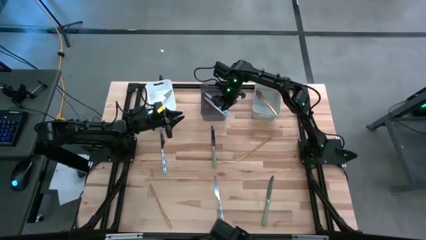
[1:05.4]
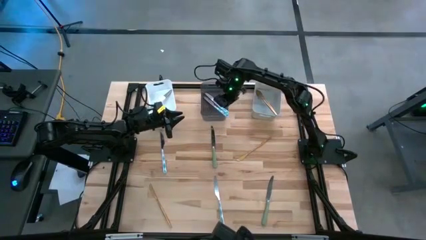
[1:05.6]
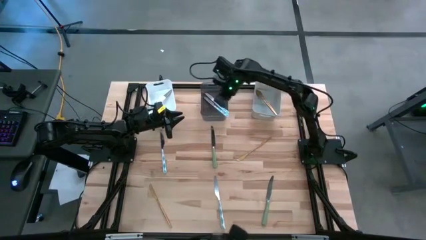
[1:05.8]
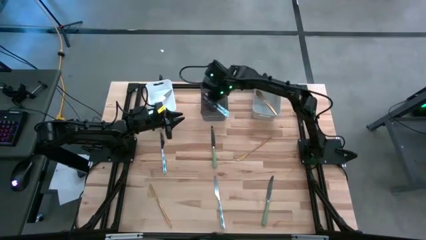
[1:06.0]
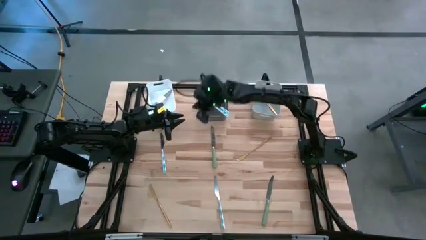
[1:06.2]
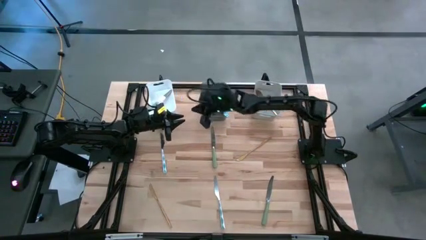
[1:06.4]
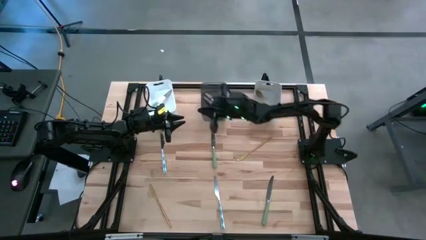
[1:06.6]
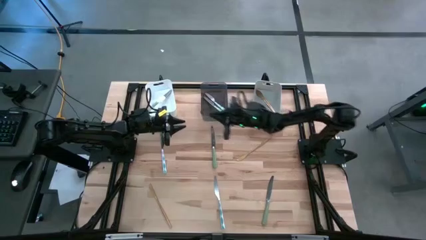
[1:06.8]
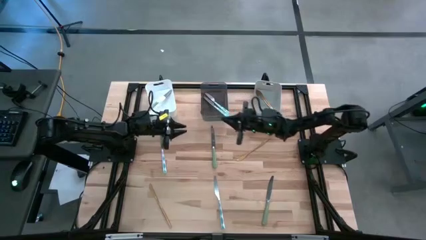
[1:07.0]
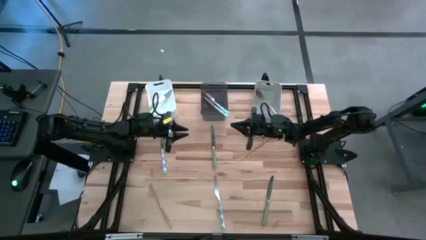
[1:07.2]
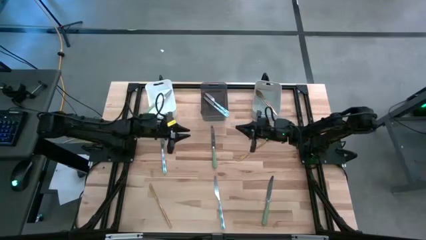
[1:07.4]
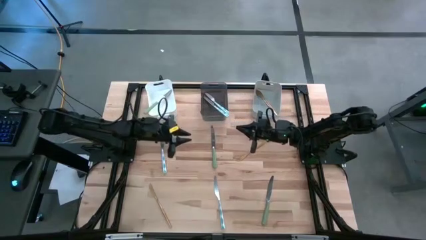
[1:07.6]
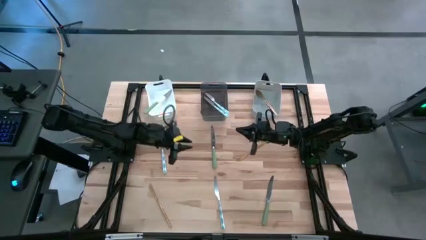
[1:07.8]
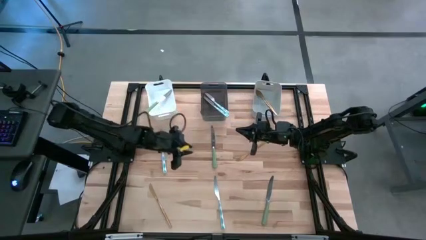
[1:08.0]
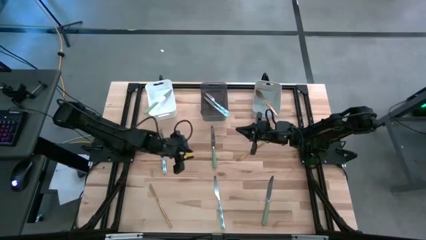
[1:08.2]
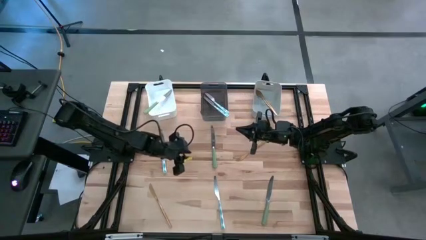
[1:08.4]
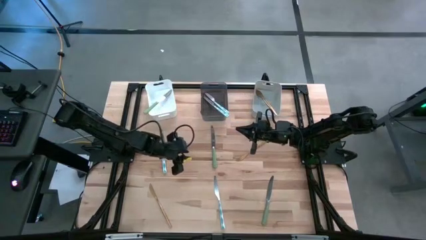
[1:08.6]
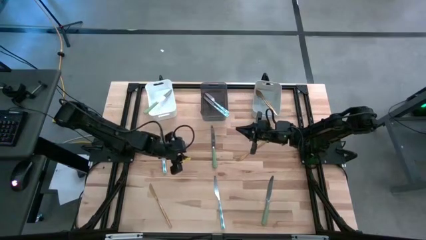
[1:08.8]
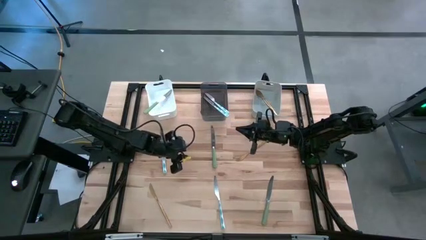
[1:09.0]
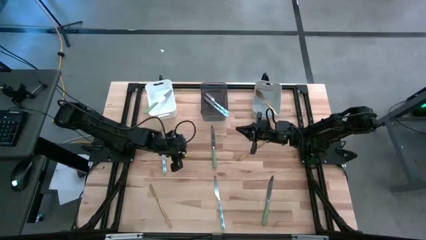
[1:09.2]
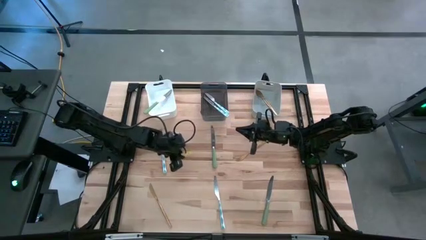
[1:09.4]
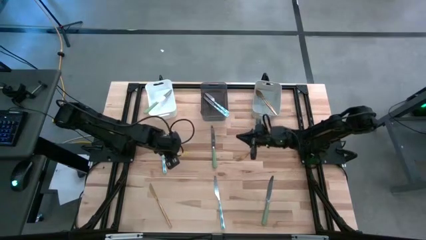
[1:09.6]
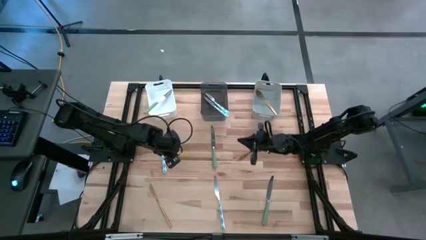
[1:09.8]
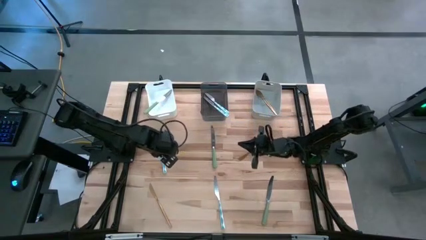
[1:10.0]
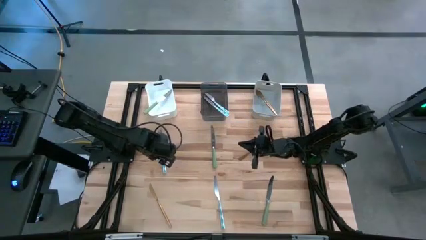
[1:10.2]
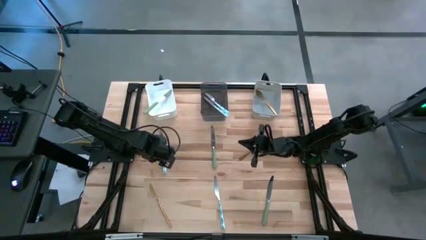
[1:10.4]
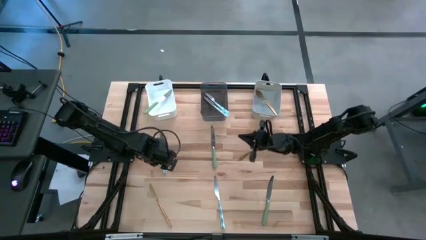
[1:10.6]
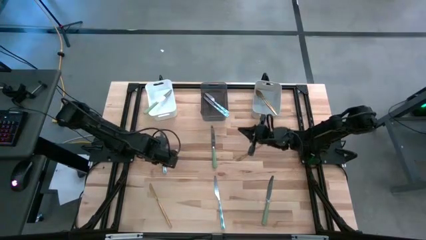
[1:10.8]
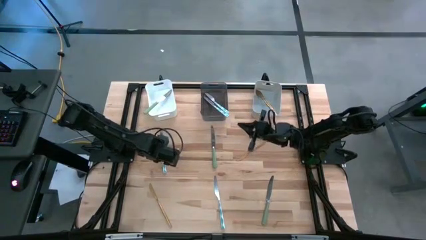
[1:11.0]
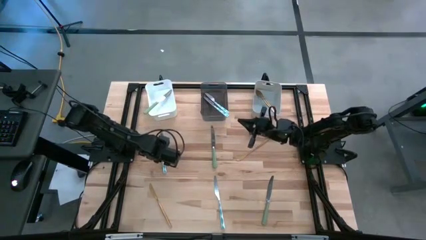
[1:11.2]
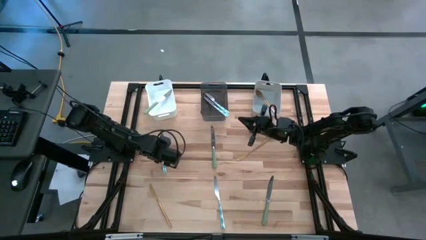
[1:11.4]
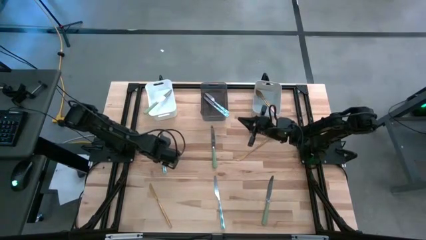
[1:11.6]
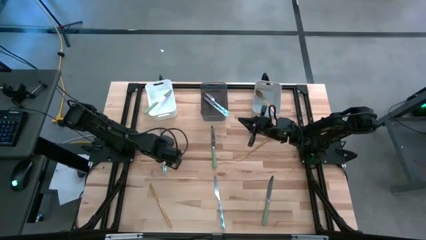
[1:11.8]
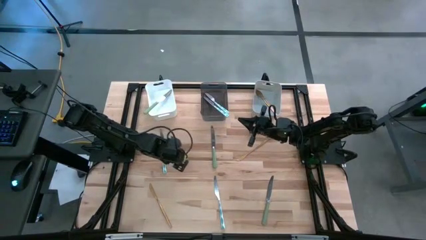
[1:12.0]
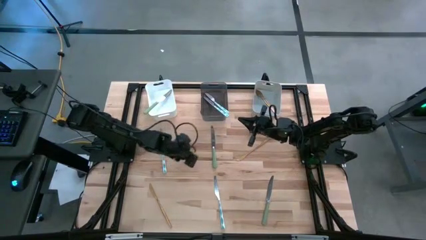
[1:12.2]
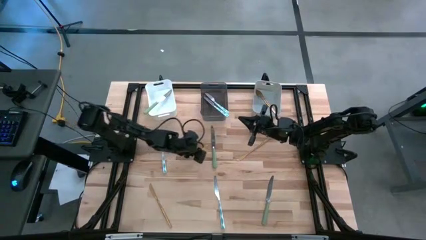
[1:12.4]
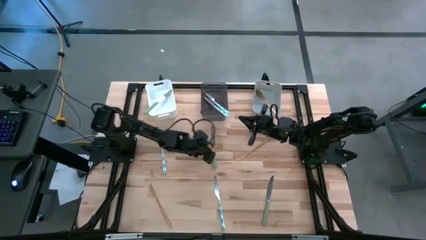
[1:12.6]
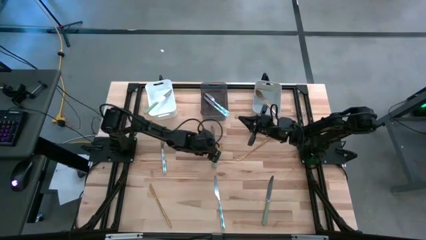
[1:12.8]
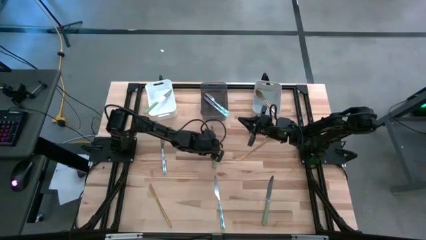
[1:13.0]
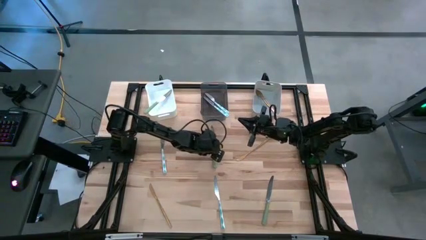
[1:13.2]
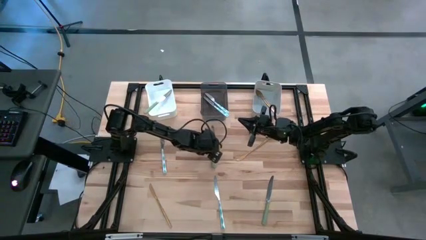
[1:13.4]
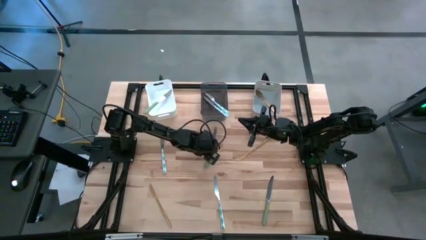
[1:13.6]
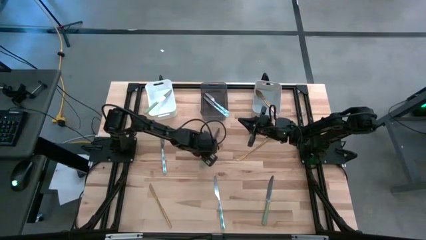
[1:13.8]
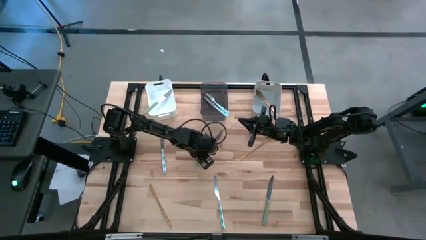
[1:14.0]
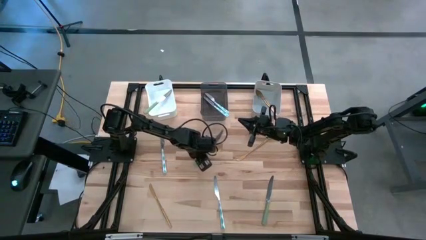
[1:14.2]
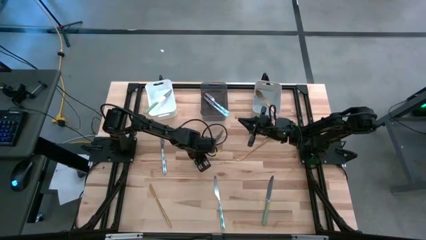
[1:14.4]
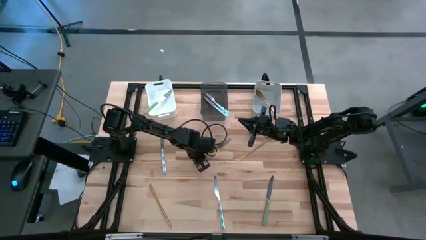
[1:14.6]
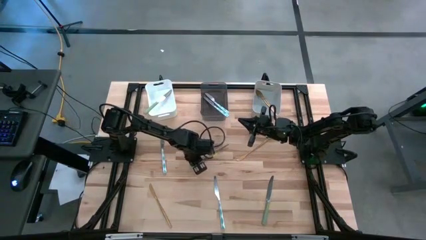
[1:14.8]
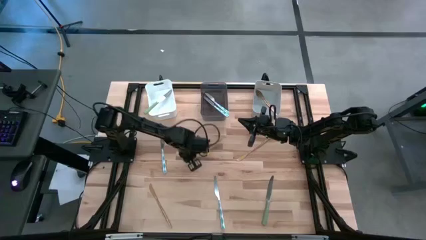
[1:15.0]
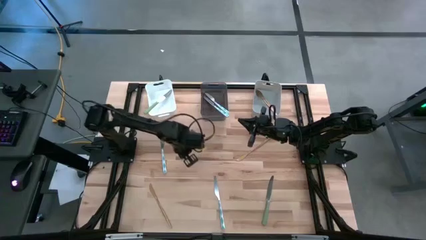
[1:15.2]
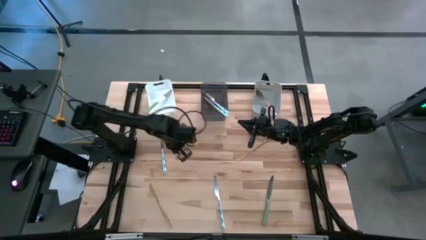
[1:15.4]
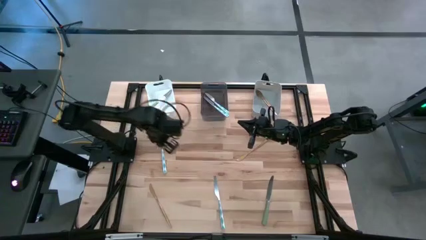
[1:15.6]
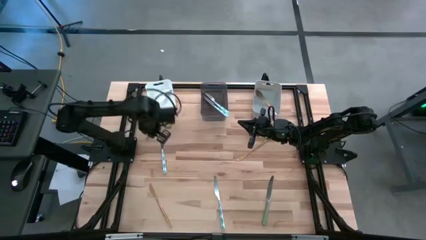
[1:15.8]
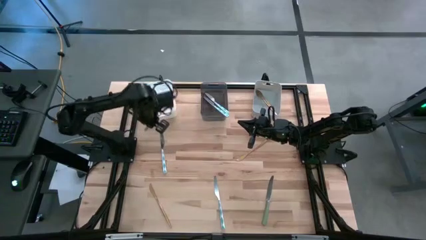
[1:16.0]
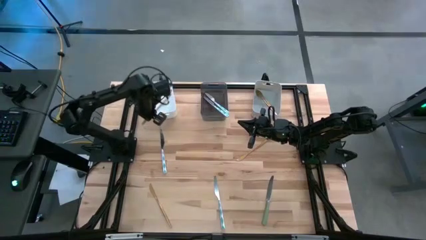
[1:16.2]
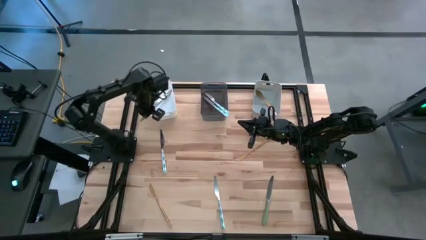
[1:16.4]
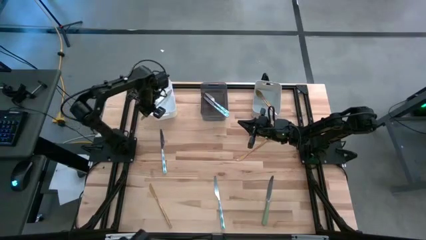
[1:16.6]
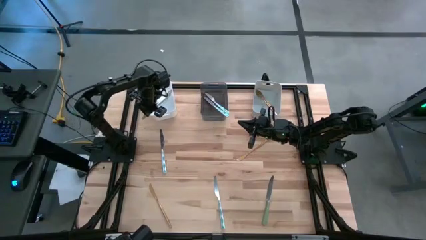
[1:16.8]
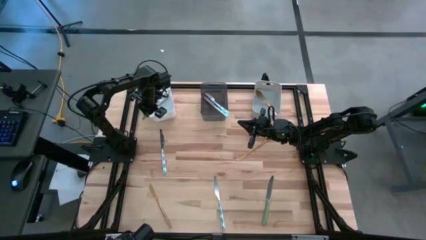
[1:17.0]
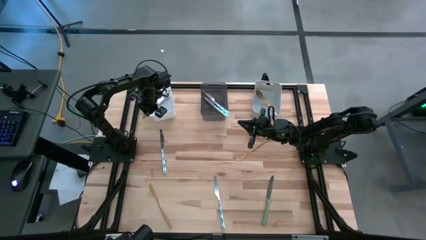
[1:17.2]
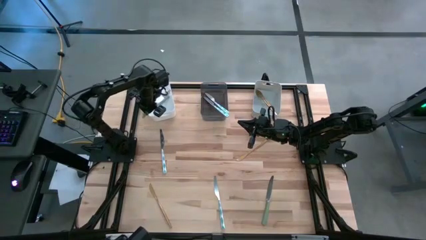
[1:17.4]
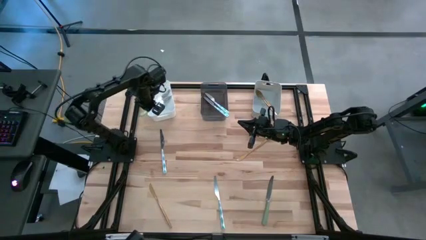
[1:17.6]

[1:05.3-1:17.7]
Task: Sort silverware by color (type)
Put the top green table knife into the white bin

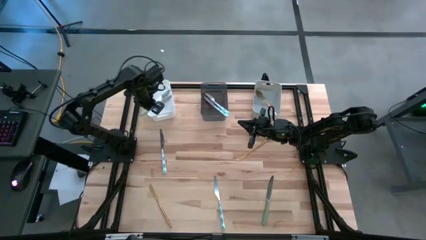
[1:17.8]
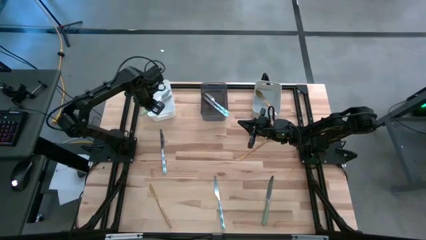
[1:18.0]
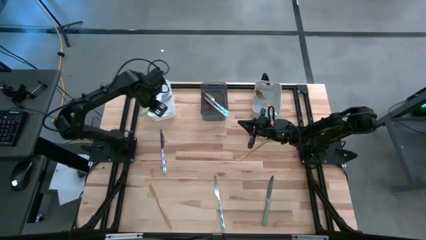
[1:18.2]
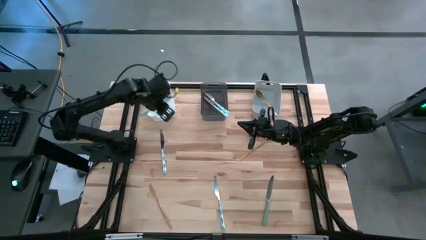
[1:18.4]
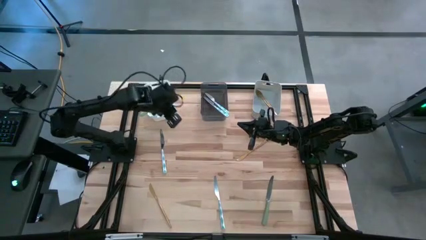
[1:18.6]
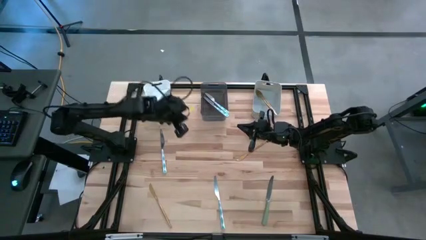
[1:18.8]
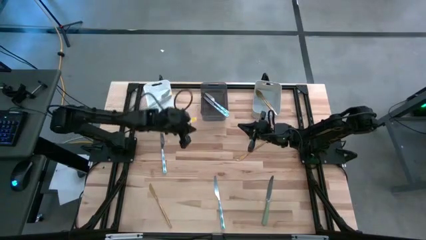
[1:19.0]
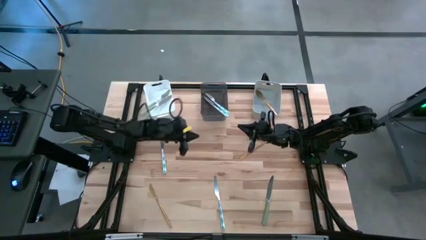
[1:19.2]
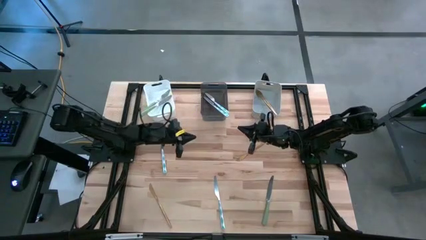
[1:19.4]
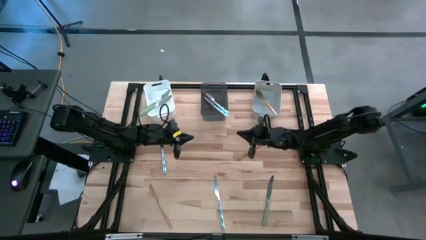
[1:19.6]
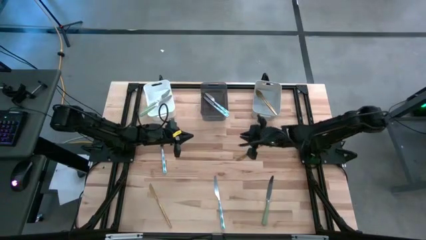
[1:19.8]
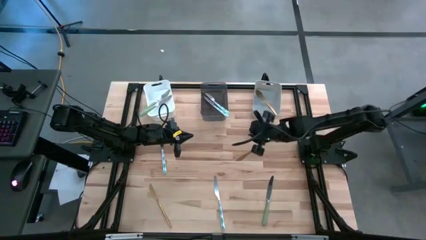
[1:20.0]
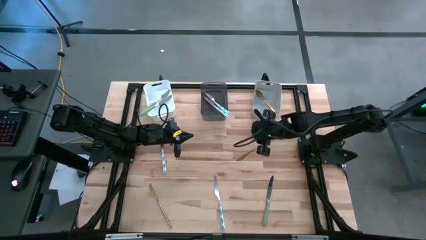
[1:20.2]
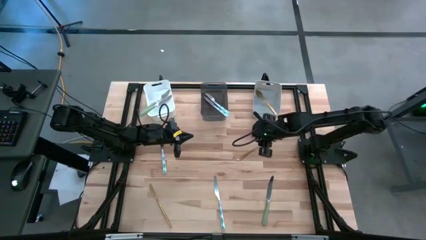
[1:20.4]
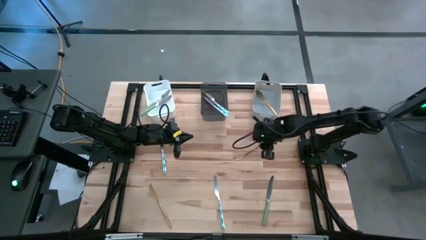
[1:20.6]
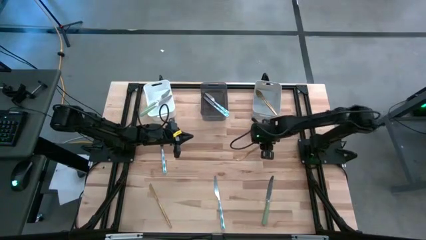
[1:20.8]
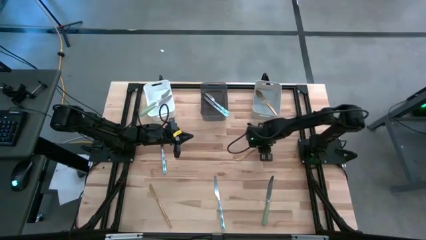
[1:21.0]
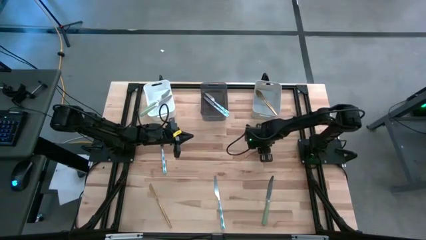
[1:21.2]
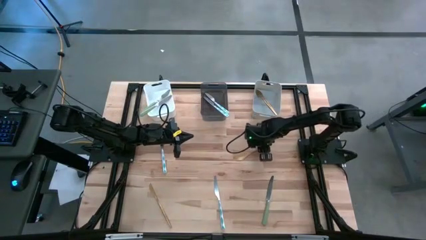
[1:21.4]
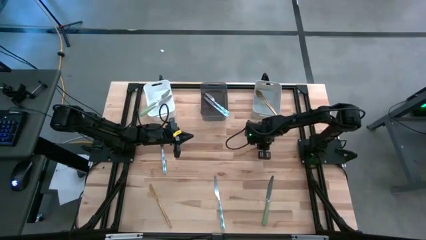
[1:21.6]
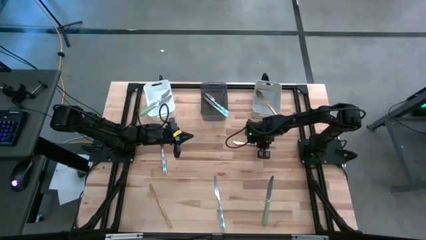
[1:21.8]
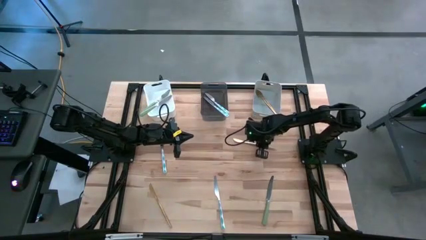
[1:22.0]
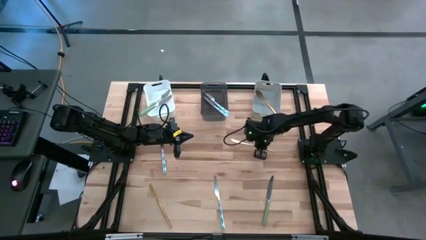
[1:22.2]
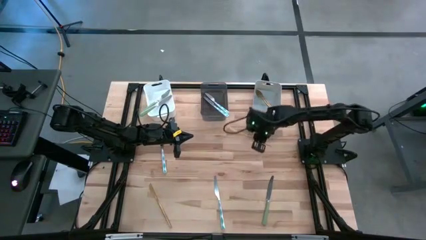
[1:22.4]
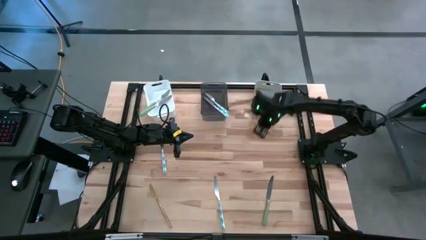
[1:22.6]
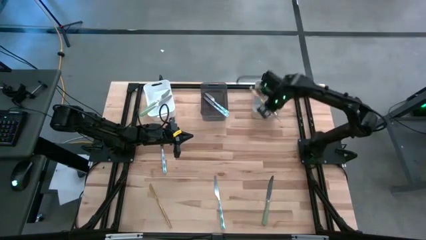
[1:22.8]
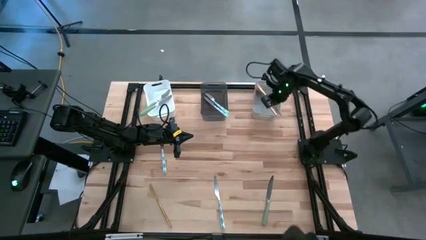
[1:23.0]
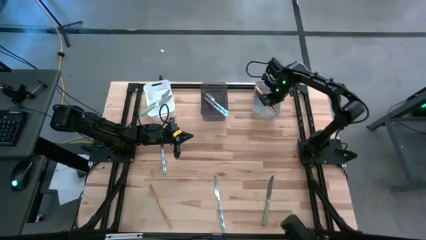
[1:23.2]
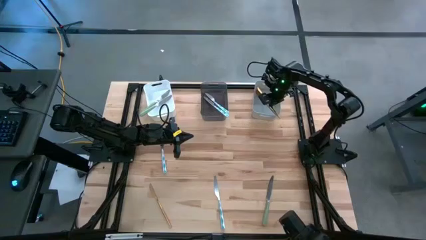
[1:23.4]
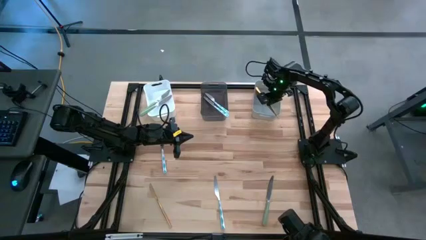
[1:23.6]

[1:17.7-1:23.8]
Put the top yellow table knife into the gray bin
